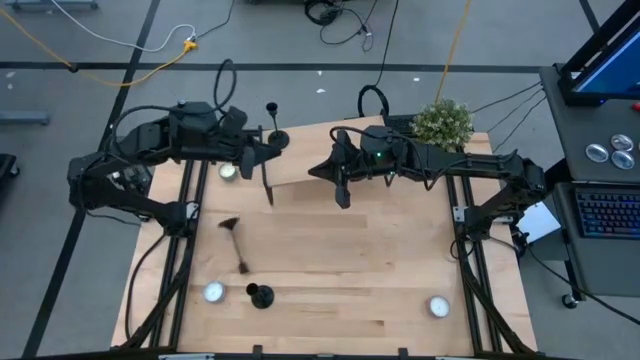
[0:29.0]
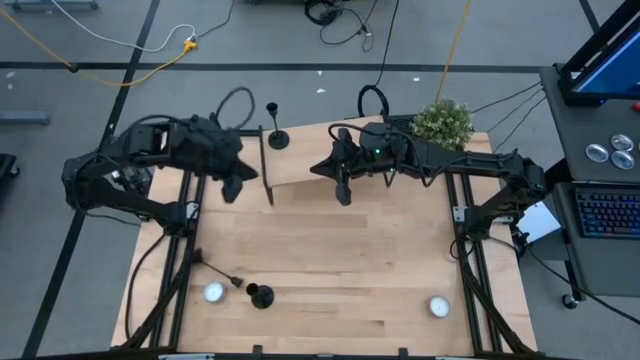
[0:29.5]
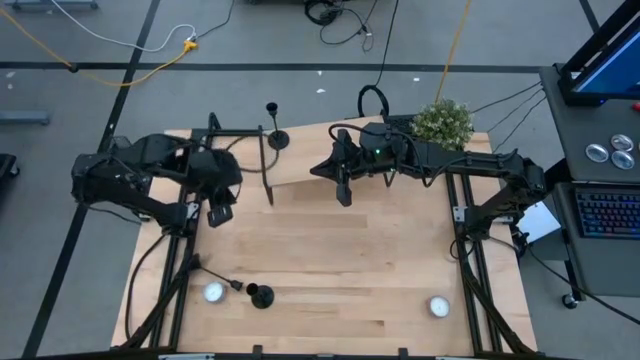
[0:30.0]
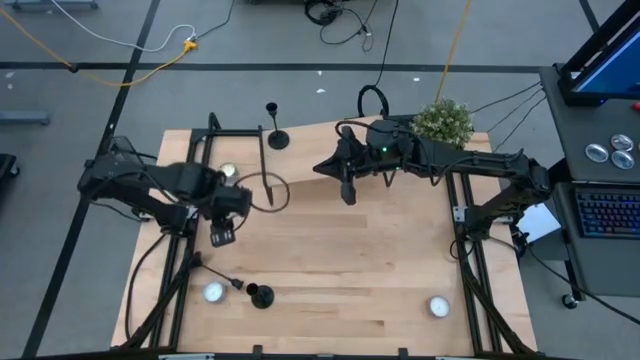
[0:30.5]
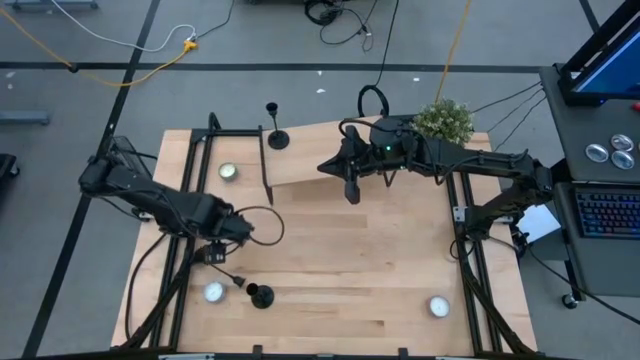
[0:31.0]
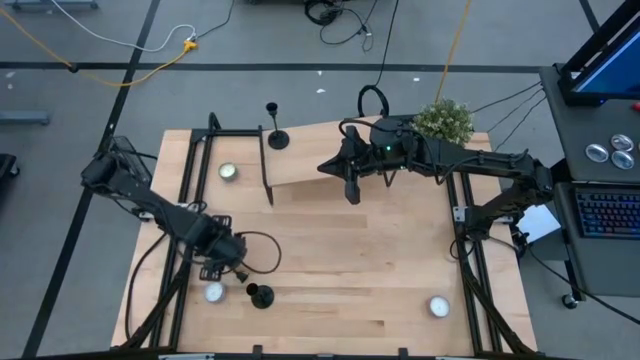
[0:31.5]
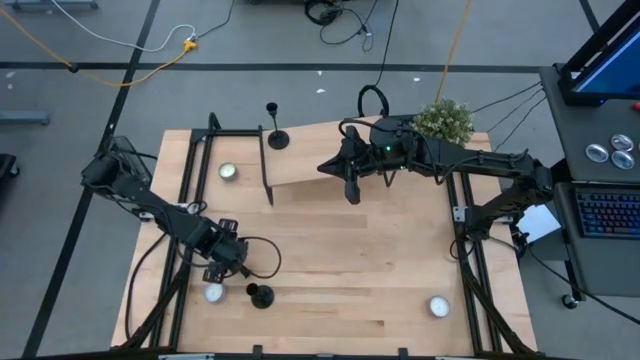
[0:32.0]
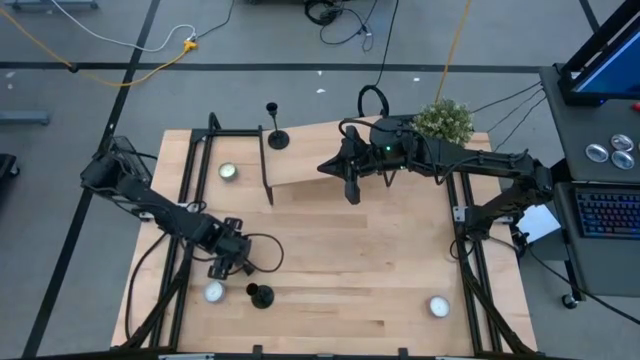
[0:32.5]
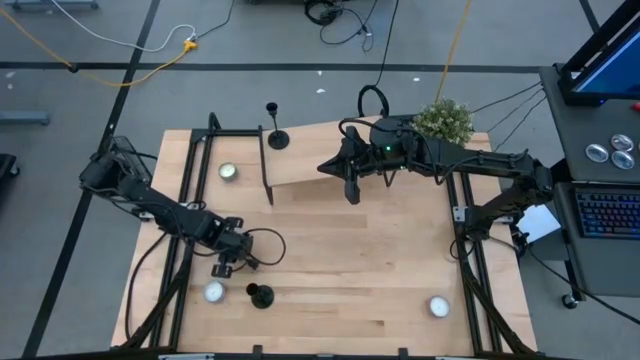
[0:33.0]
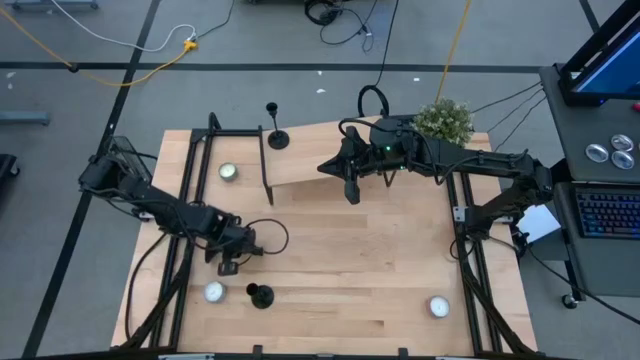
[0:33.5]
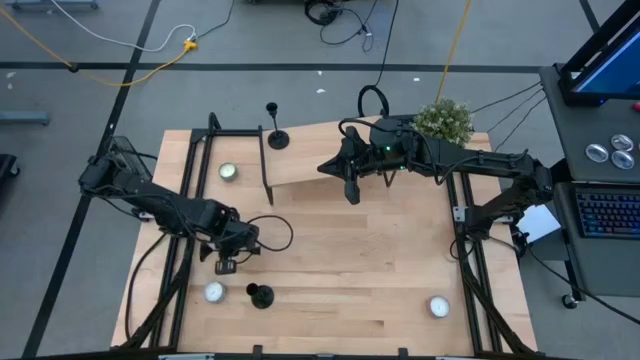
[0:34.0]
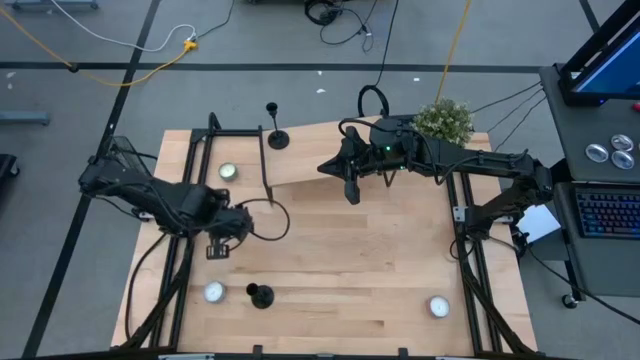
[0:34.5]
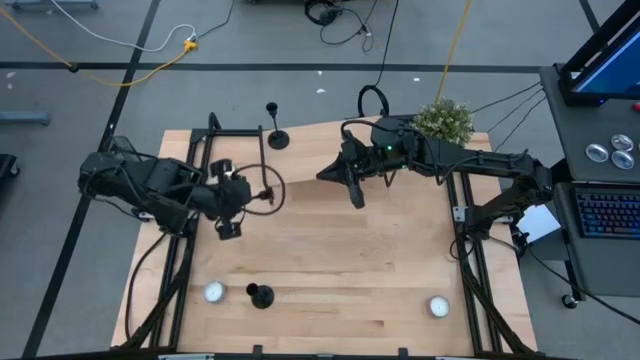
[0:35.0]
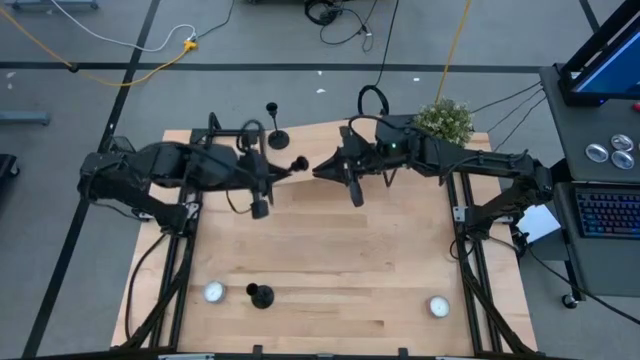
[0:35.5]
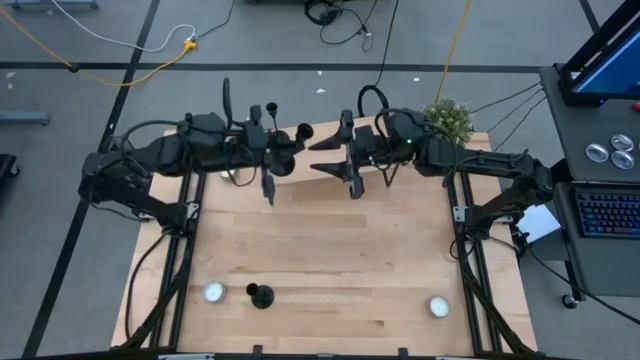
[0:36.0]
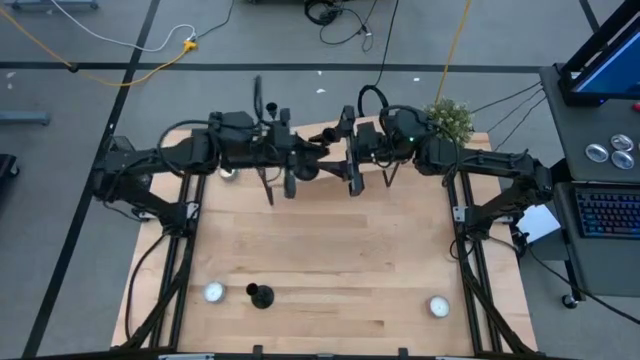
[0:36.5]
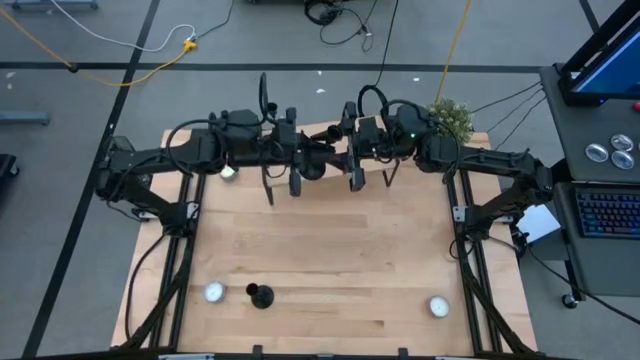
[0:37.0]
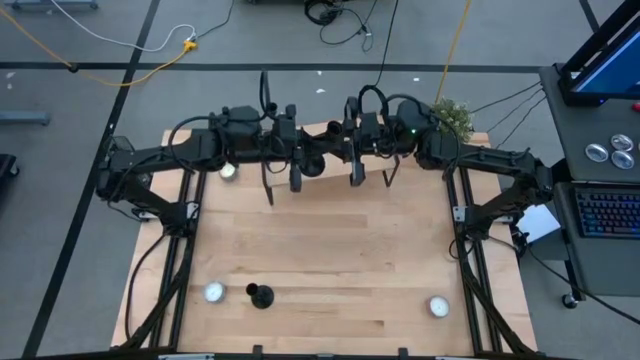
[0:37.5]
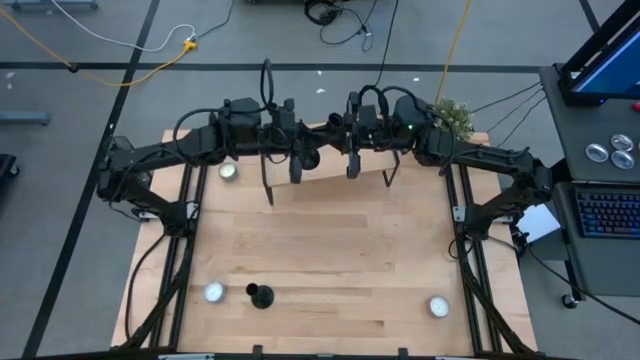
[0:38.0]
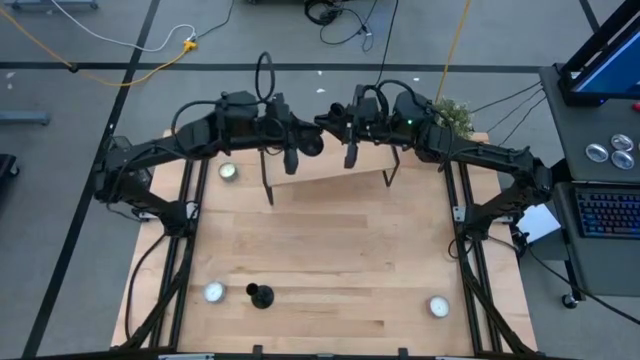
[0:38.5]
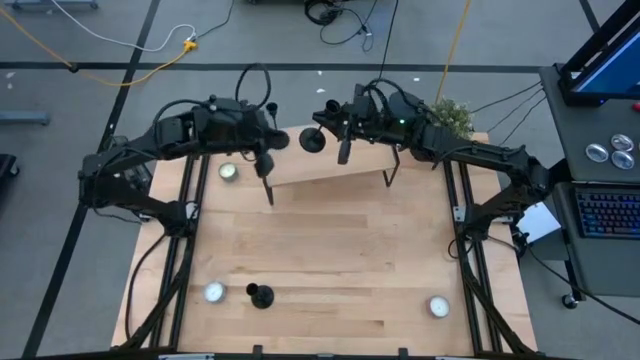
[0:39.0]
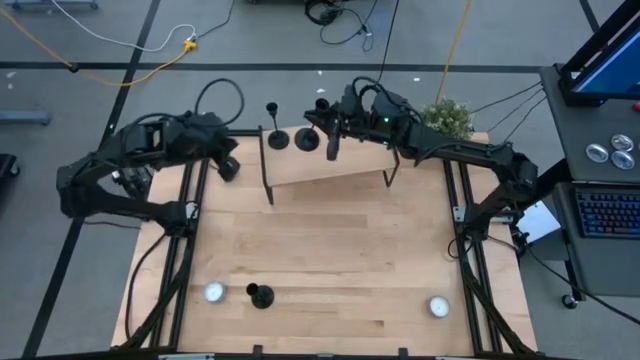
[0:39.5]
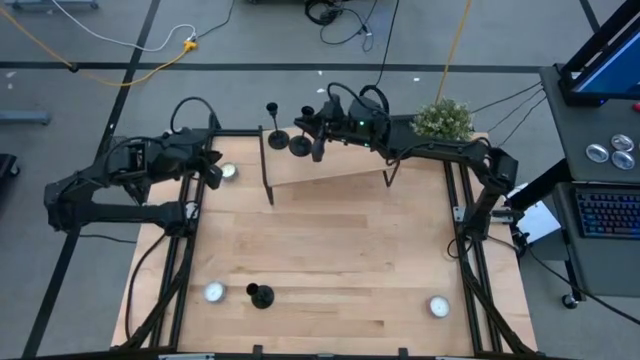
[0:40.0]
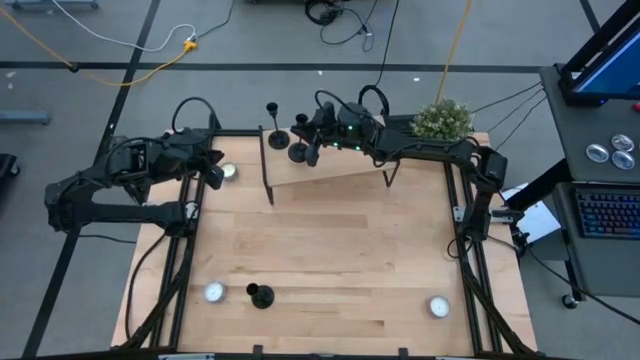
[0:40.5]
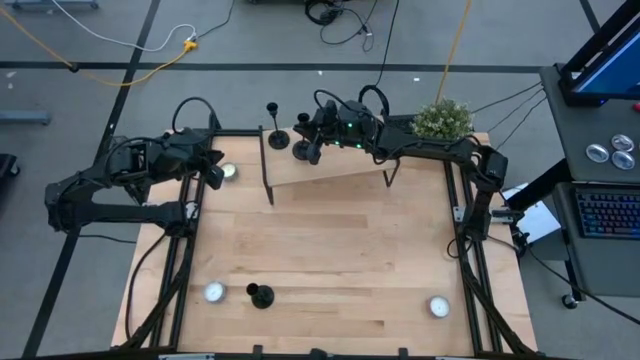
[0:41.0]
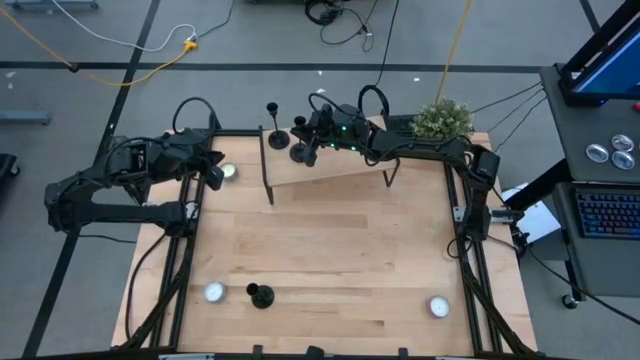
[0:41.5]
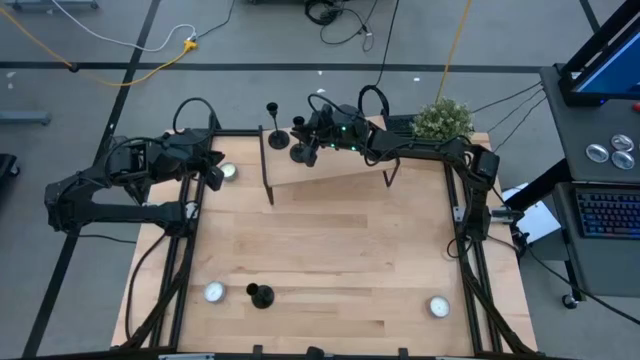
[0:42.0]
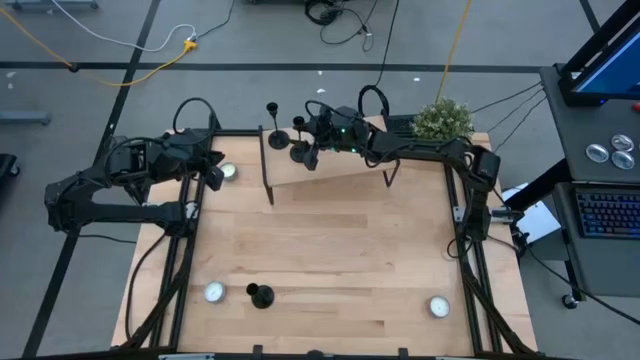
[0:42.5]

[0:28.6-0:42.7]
Task: Pick & Place candle stick holders
Put the top candle holder on the shelf

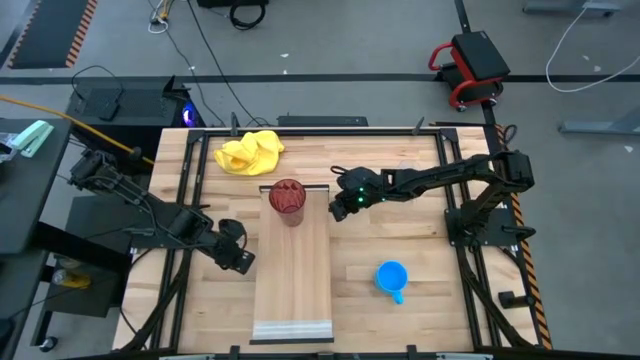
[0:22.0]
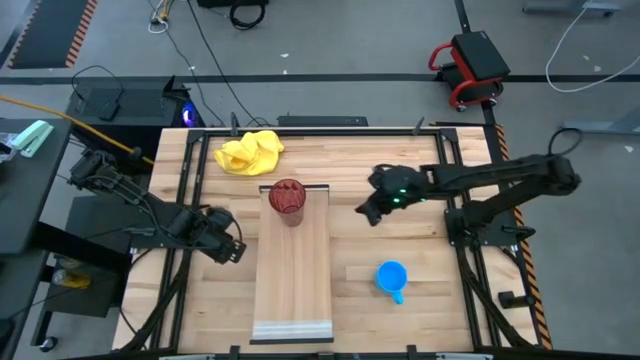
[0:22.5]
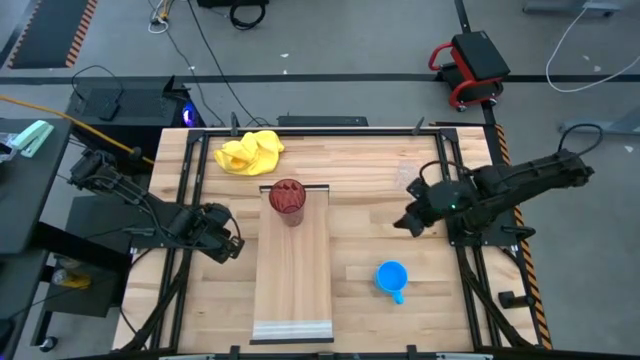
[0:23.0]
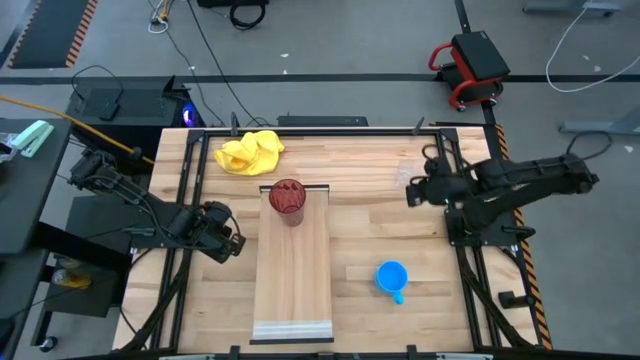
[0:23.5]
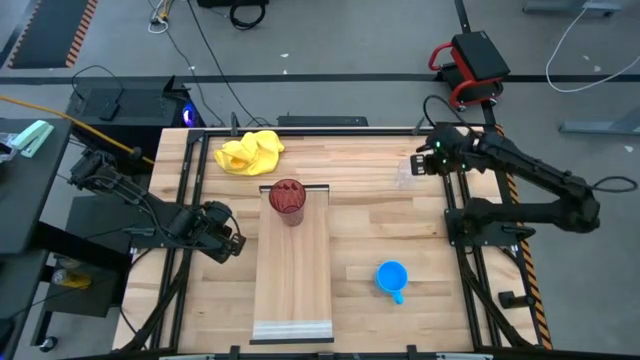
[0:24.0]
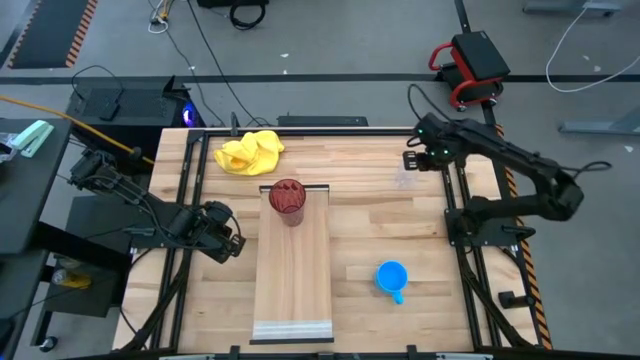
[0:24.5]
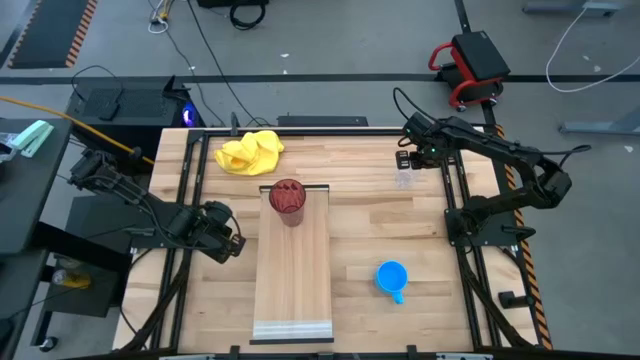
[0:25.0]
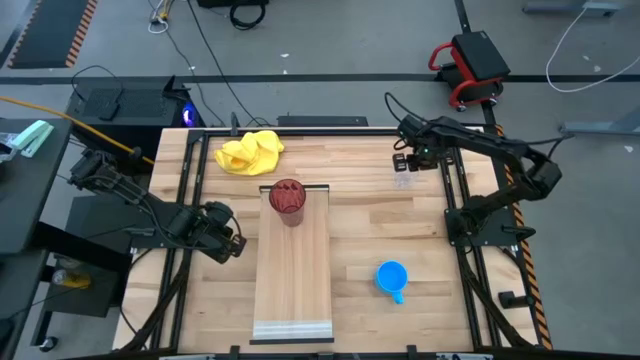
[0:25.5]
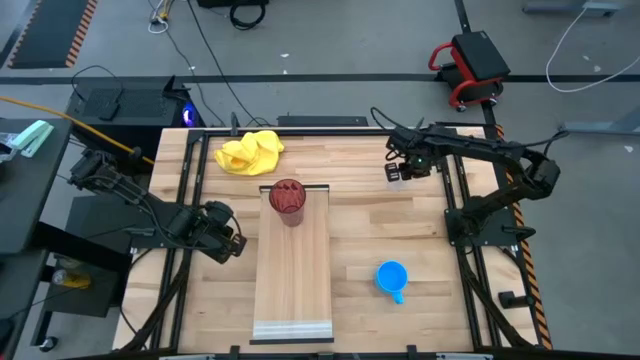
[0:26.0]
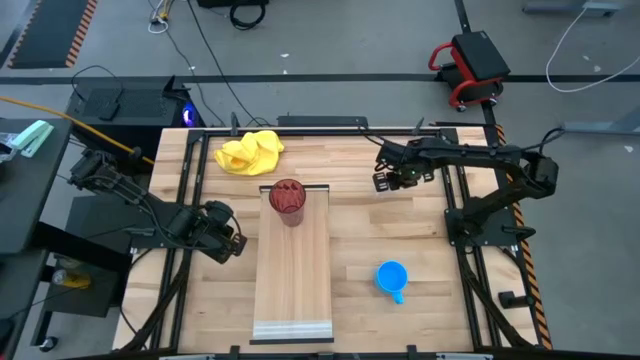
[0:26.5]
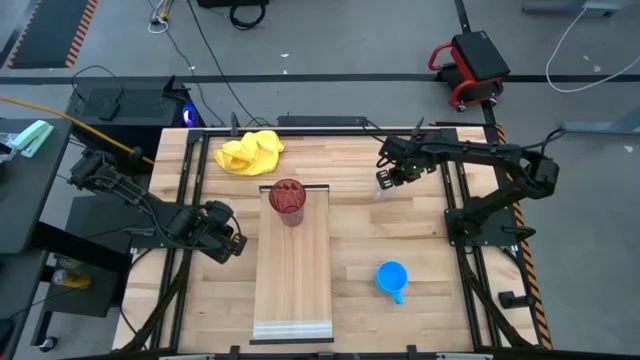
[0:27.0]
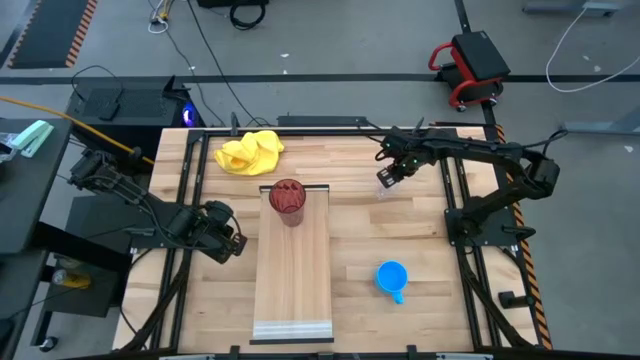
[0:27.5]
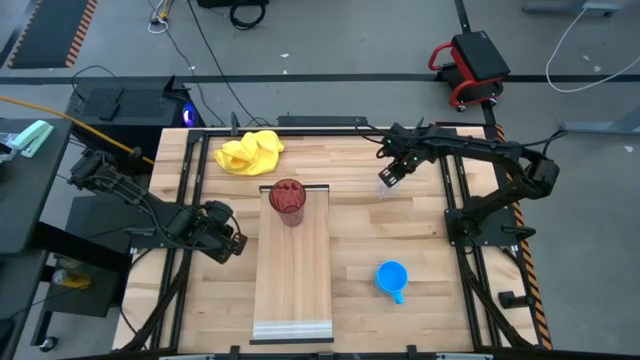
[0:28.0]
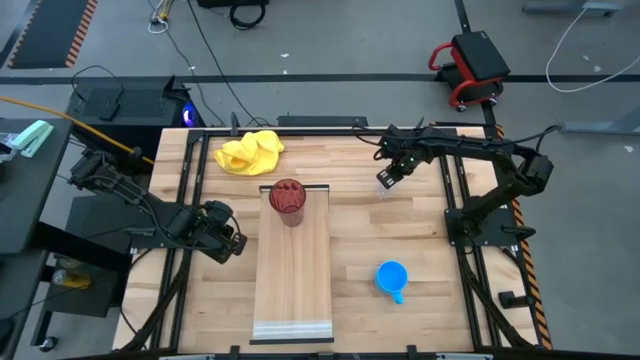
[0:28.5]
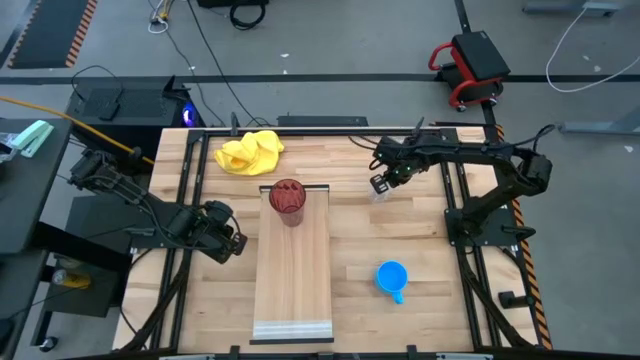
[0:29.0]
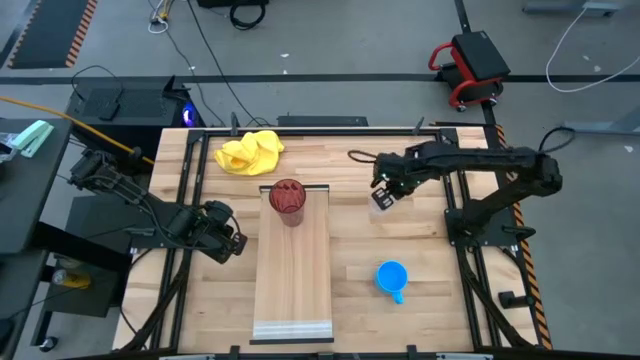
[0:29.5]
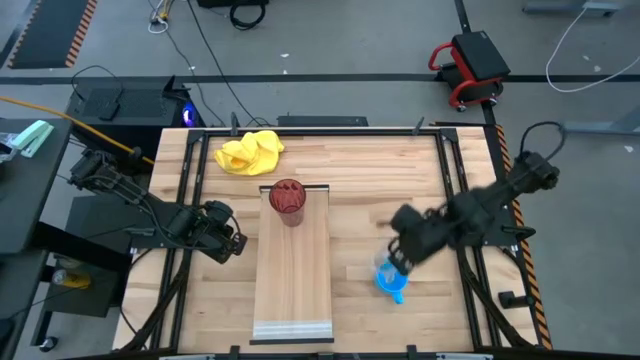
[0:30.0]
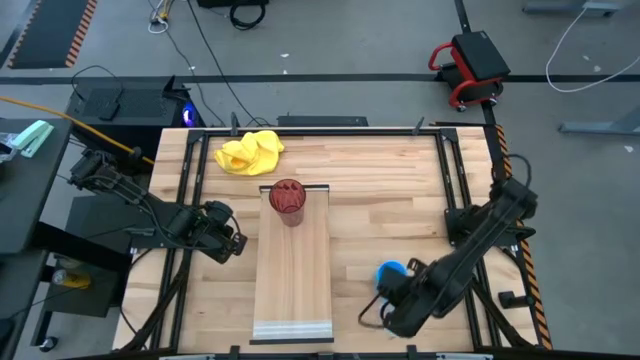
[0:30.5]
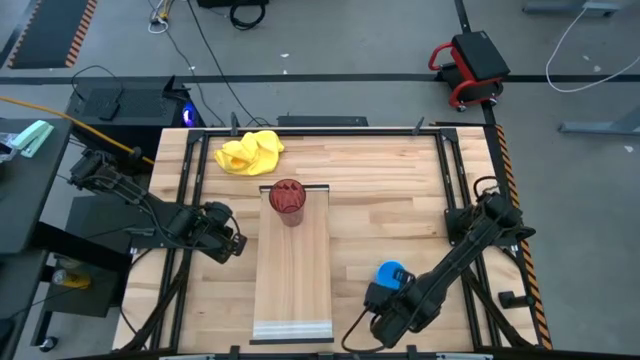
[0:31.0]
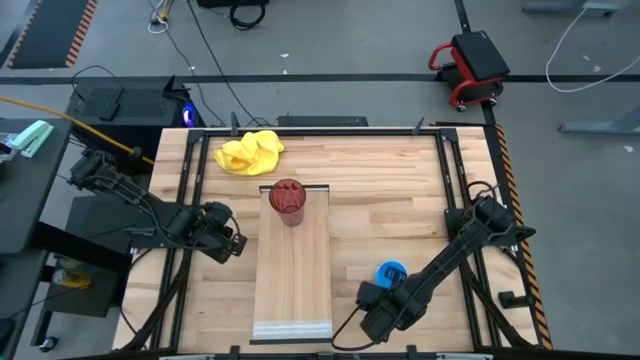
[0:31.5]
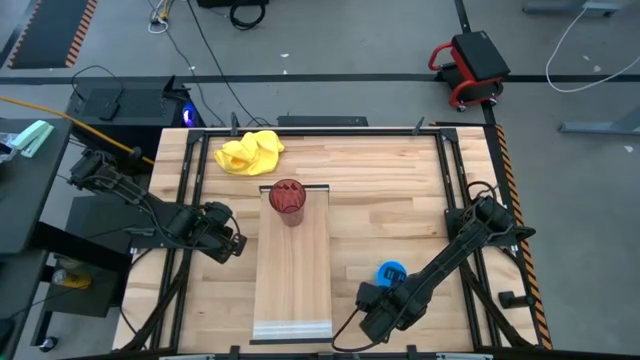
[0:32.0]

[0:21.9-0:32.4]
Task: Stack small to large cups/mugs on shelf
Move the transparent mug to the bottom right on the table
